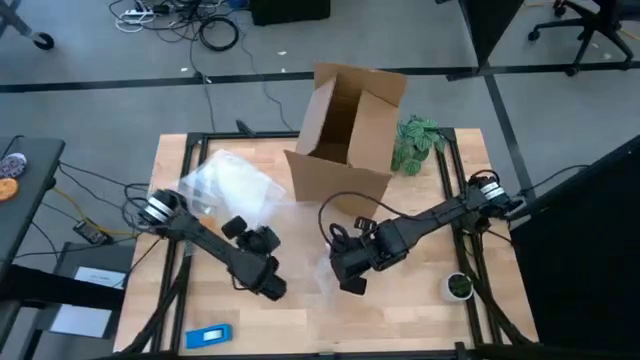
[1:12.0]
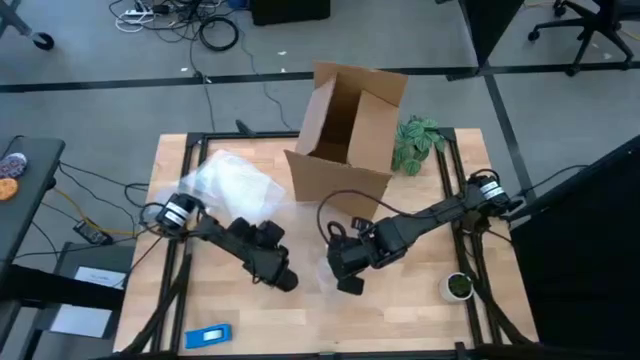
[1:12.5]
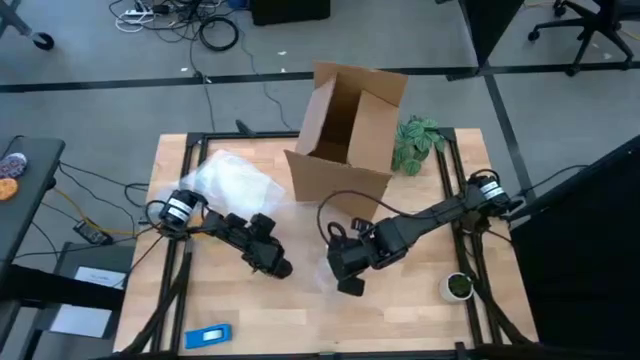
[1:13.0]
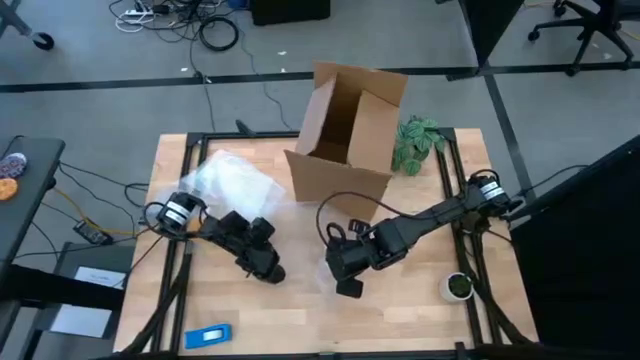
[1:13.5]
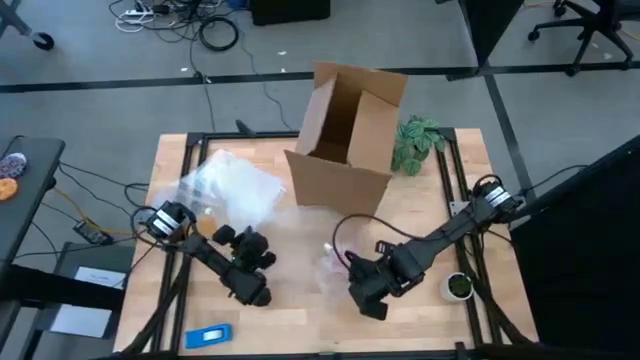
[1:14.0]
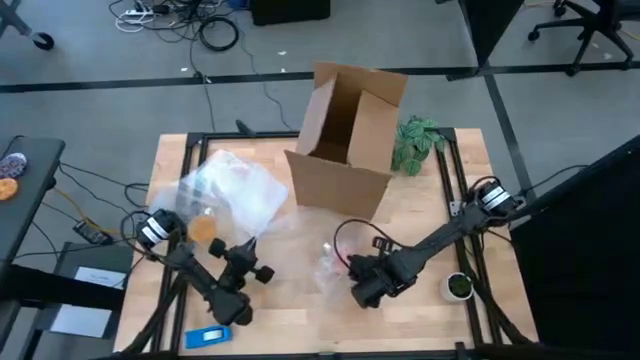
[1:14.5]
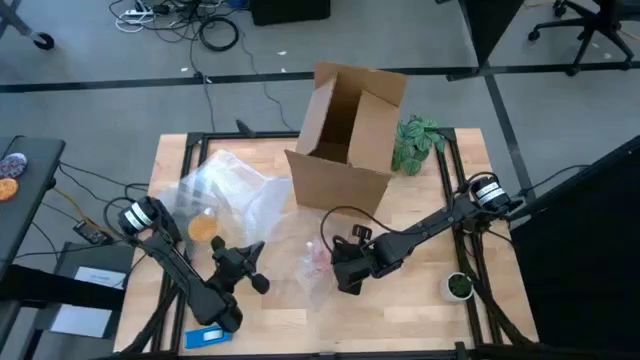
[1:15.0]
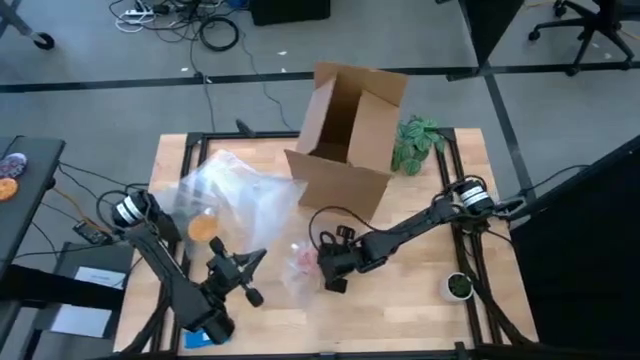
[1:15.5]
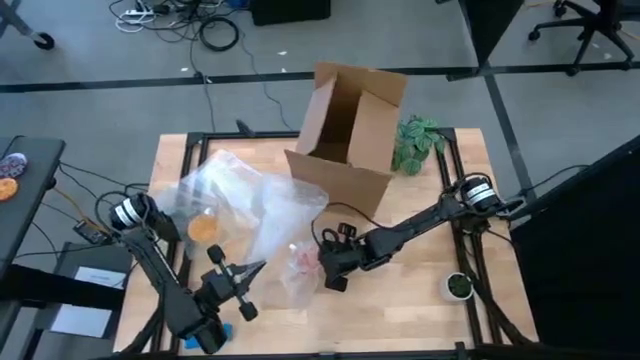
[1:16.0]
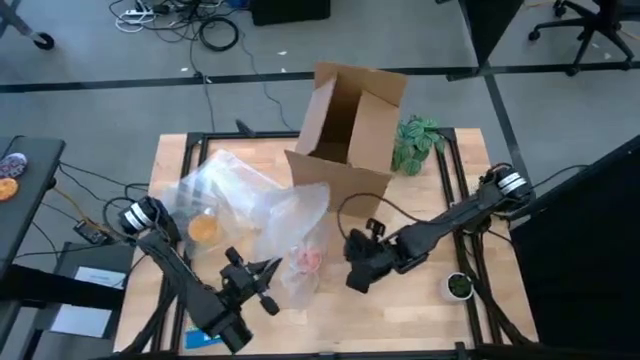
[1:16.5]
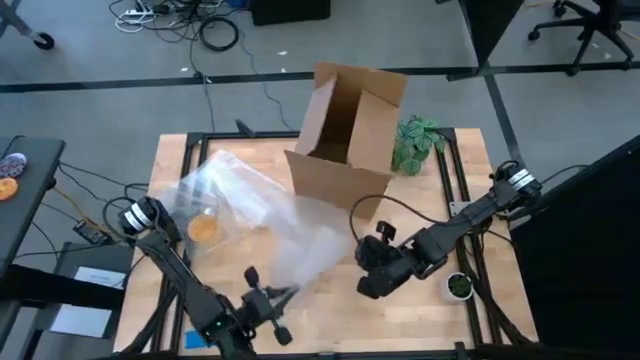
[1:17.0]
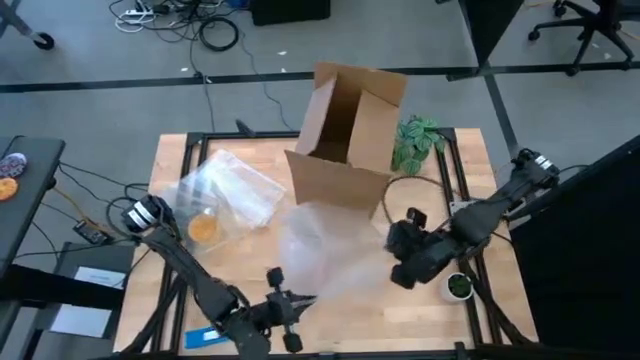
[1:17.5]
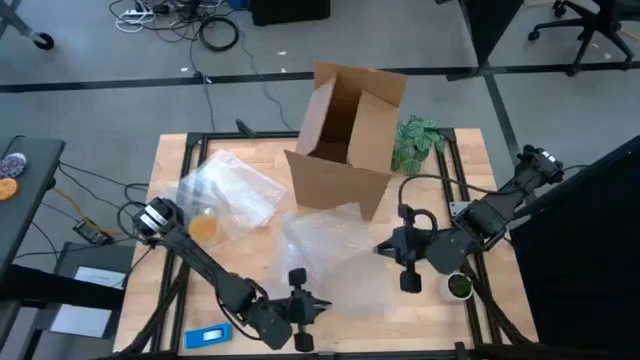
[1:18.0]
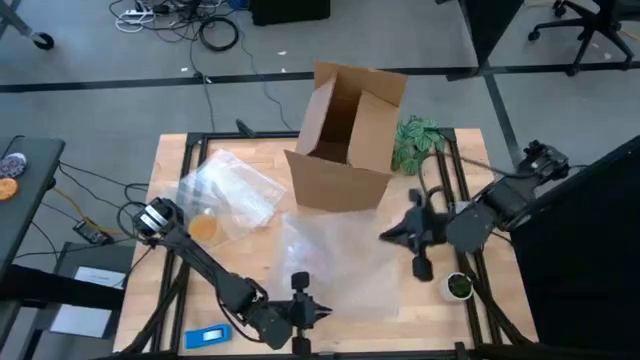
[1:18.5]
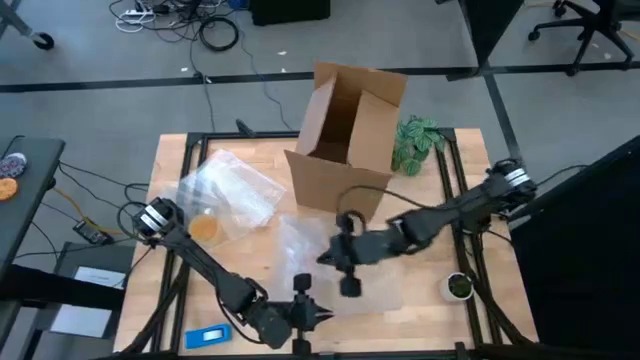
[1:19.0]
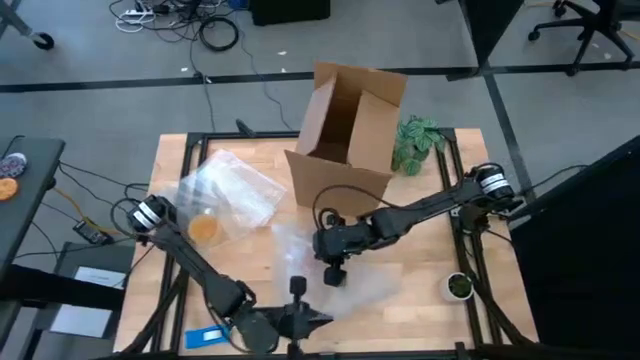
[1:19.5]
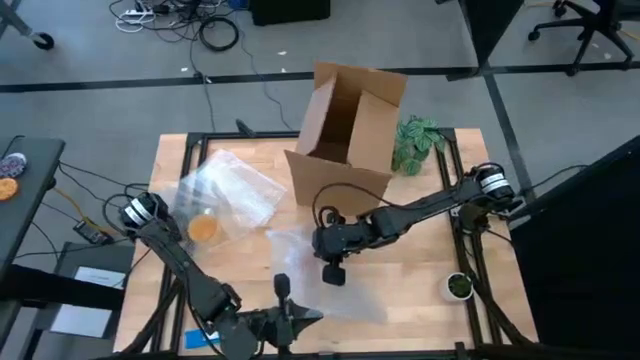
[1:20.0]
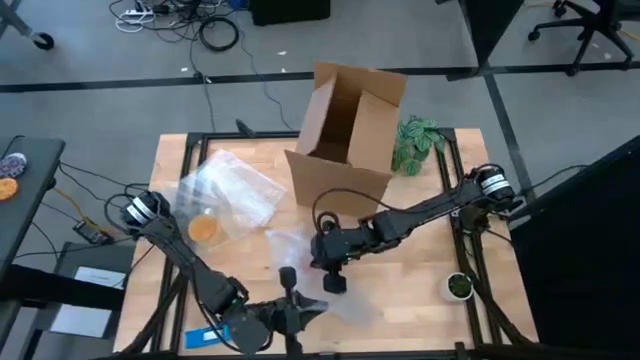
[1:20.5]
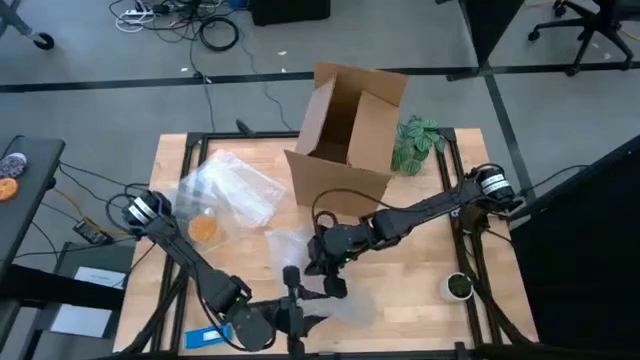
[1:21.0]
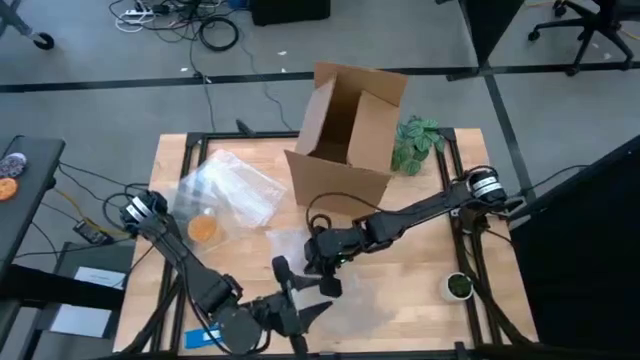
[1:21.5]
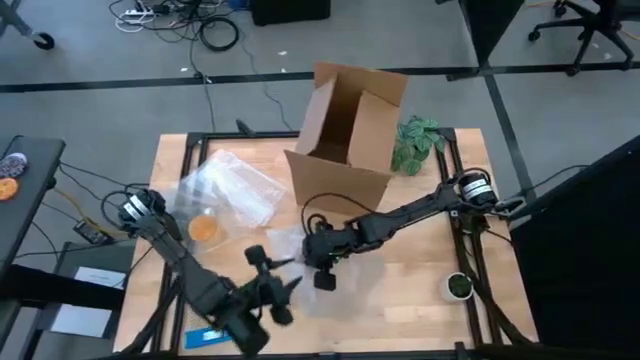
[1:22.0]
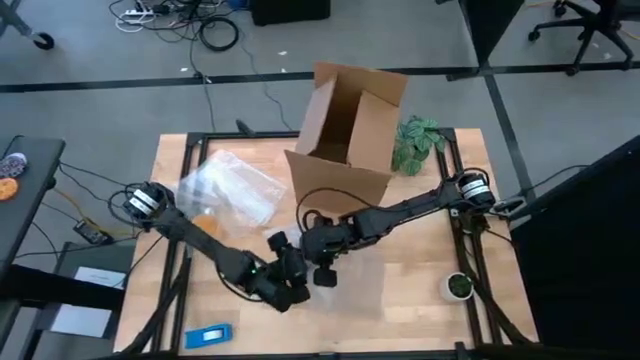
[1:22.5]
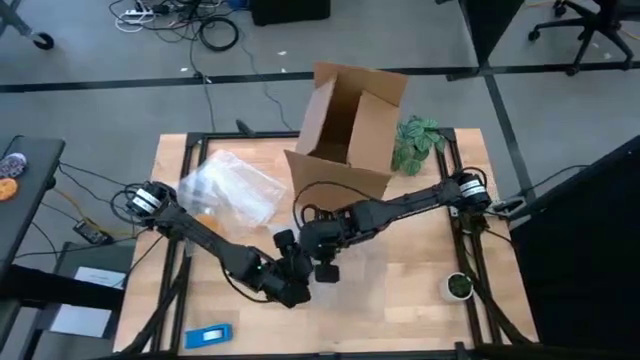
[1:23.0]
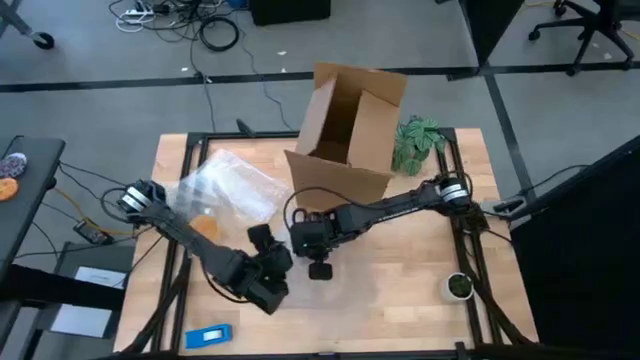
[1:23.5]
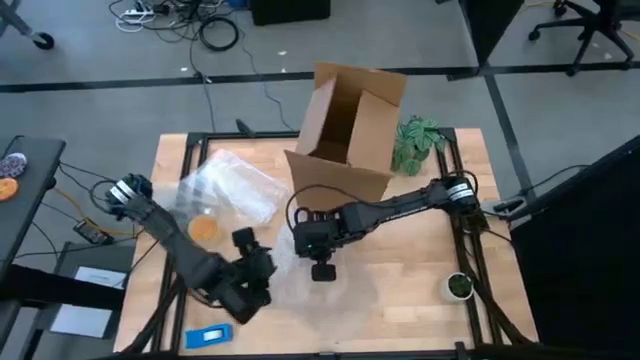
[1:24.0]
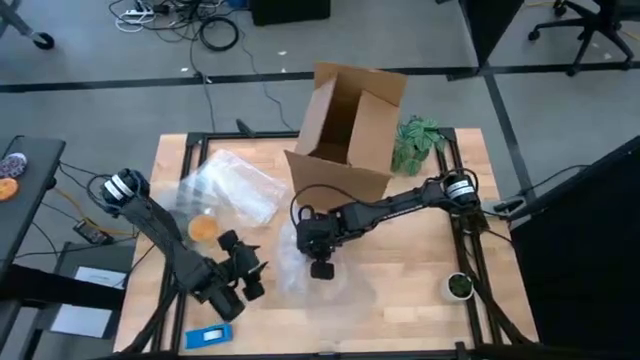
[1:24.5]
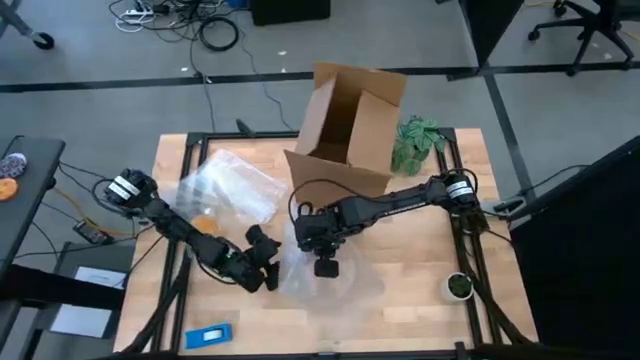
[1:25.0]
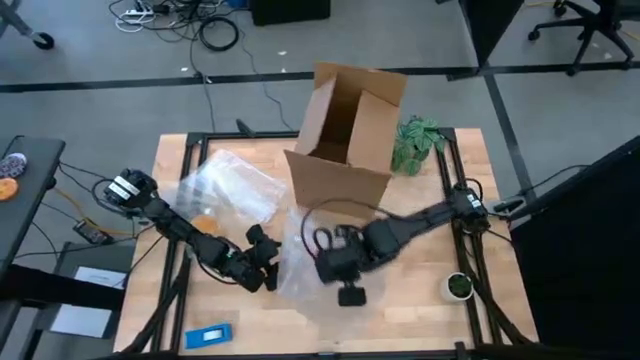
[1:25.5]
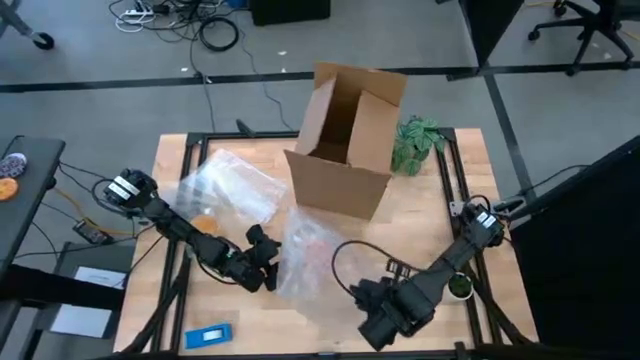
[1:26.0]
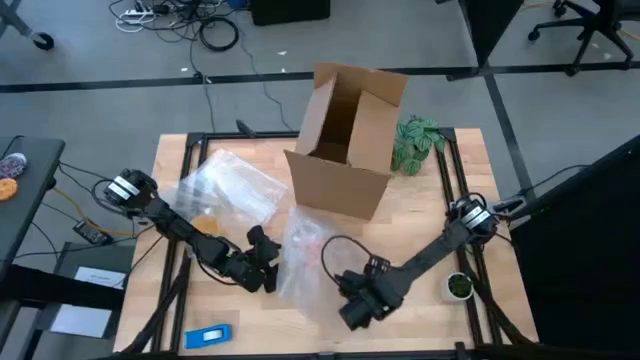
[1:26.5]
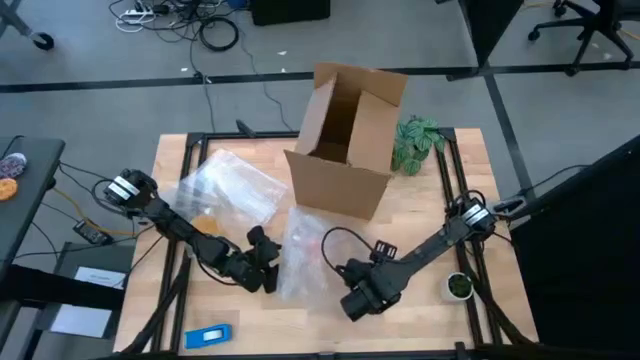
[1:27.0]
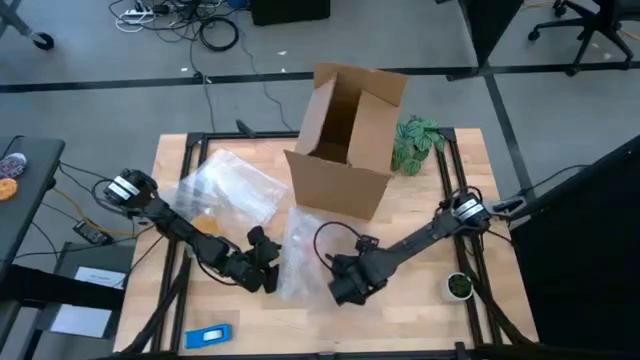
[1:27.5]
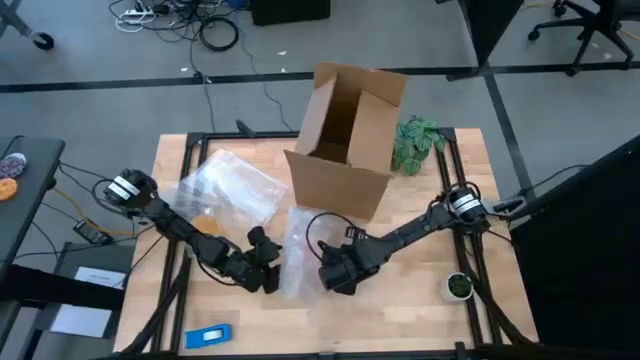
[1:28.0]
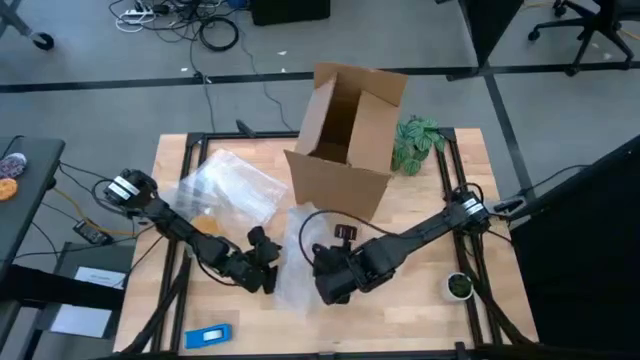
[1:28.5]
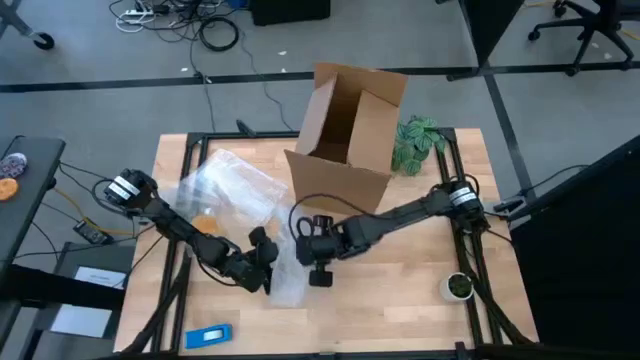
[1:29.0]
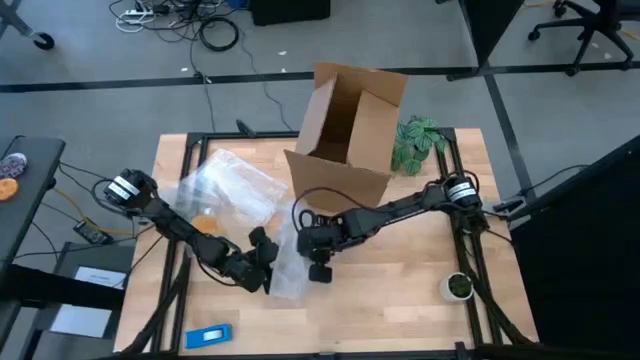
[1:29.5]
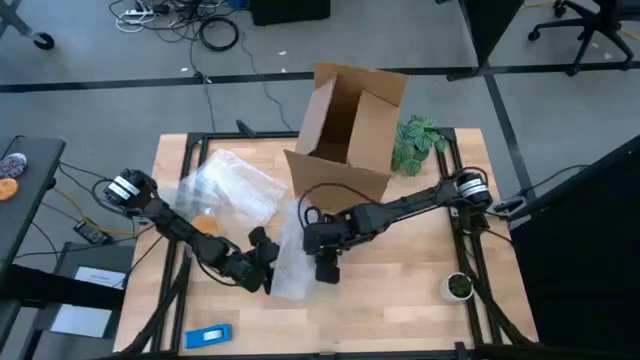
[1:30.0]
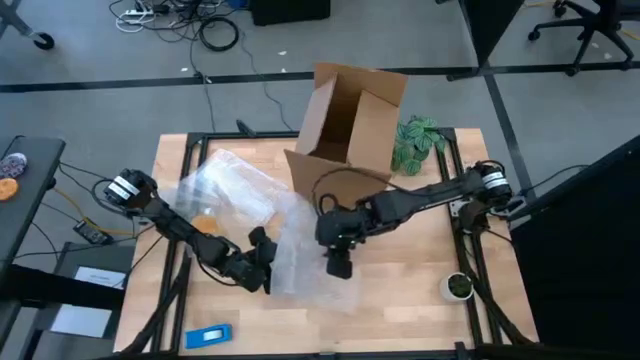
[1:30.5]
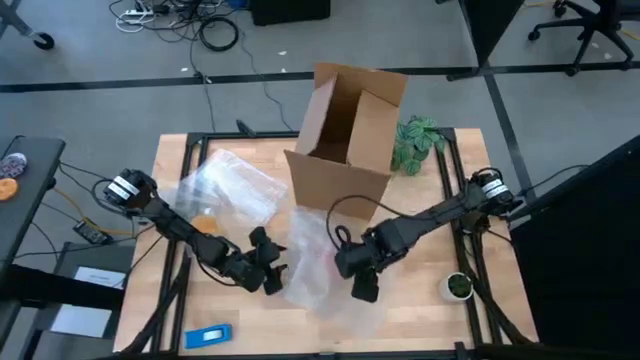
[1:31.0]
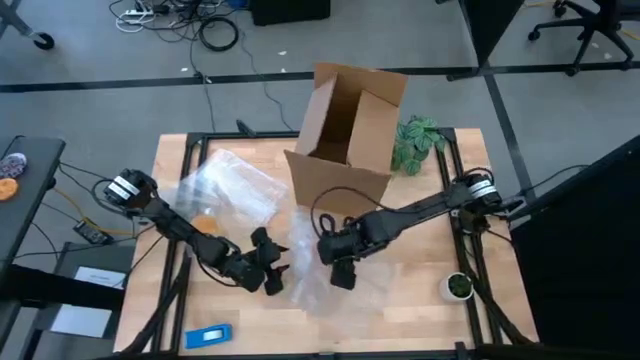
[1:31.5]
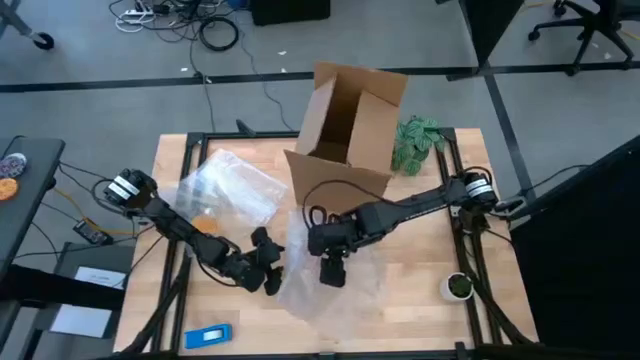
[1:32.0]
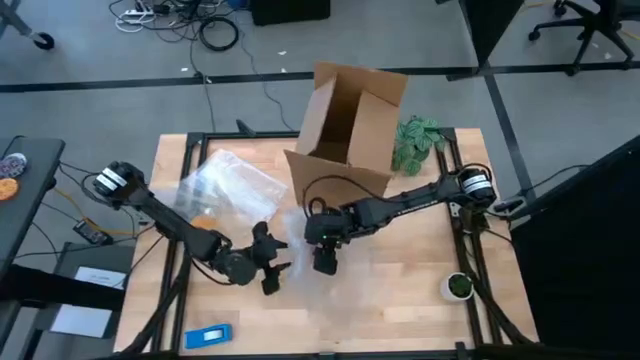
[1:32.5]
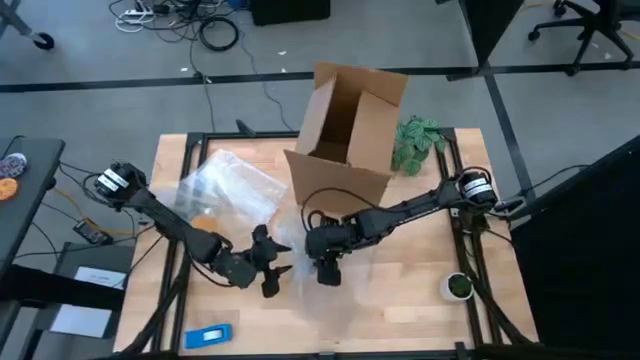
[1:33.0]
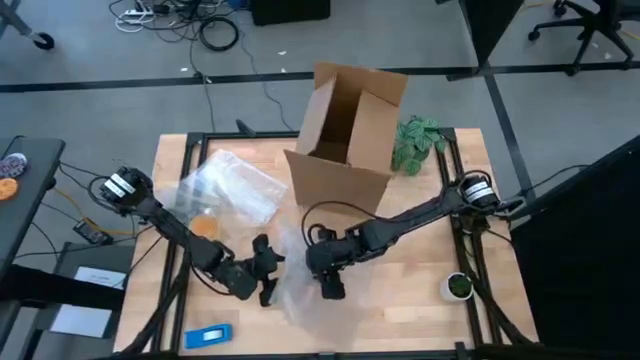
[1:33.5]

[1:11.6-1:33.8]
Task: wrap mug
Wrap the orange mug with transparent bubble wrap

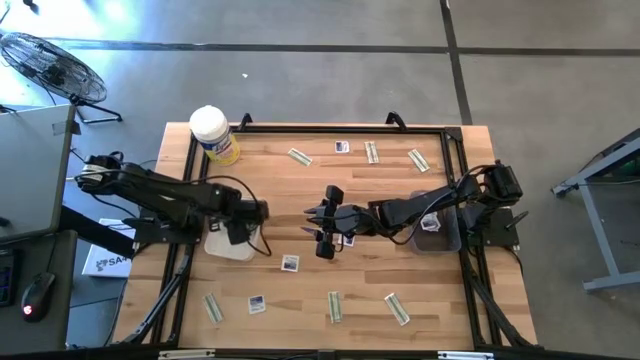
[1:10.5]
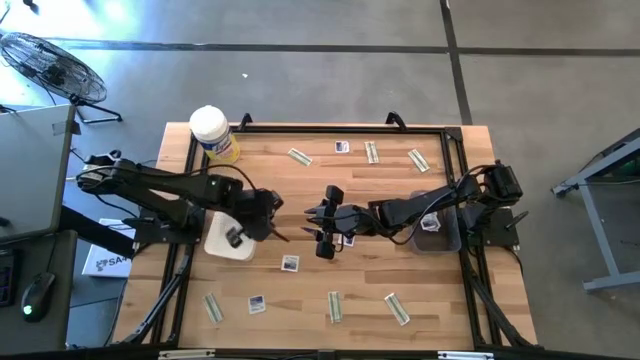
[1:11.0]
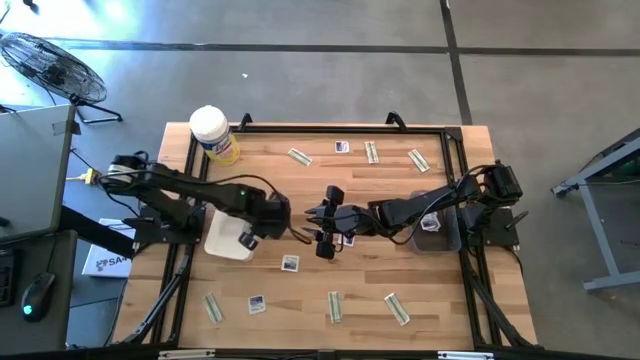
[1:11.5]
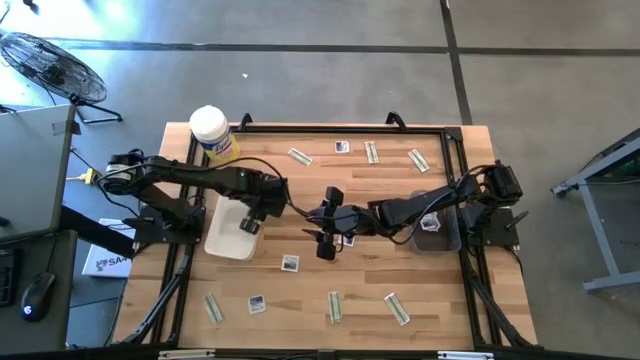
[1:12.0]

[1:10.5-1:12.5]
Task: Pick & Place First Aid Supplies
Move the white bin
